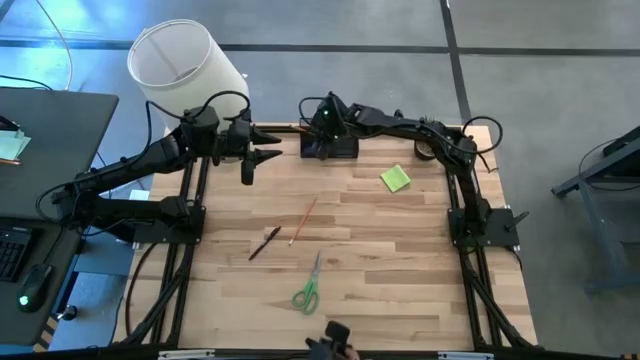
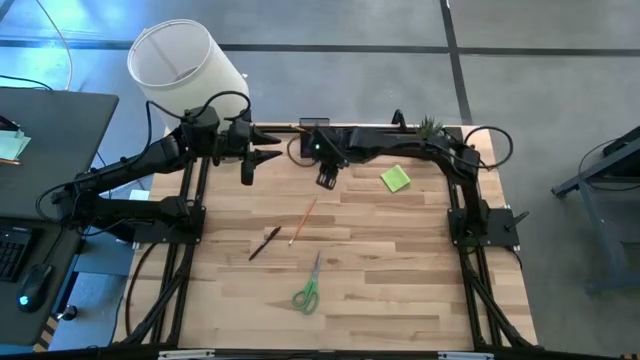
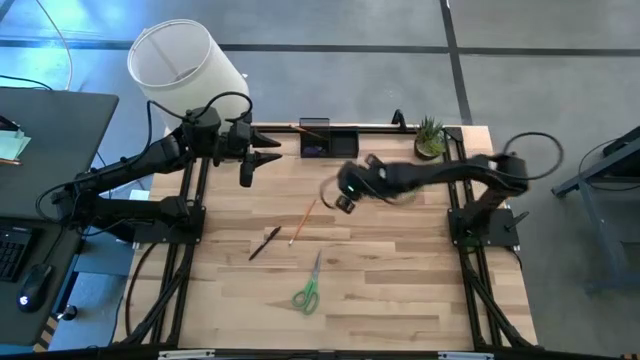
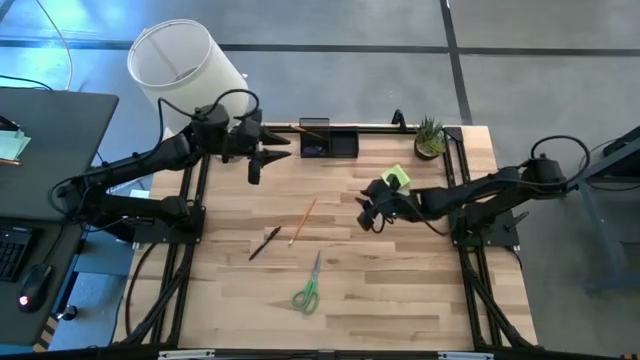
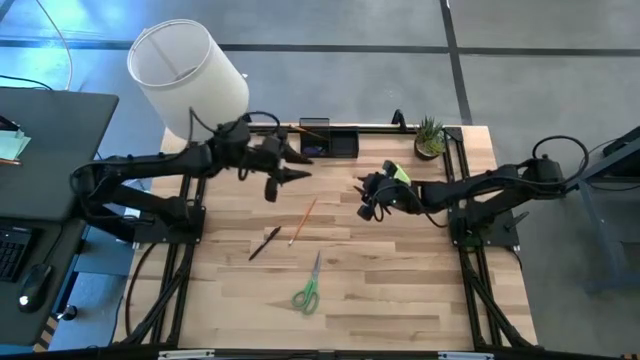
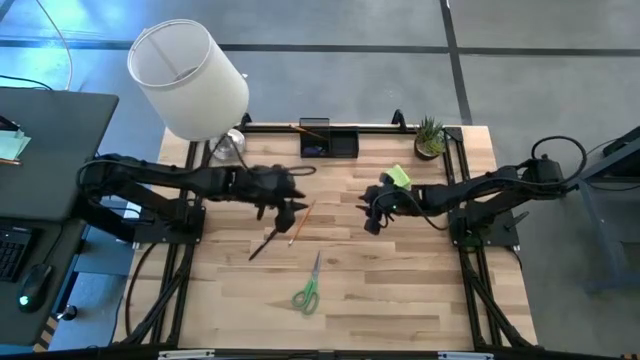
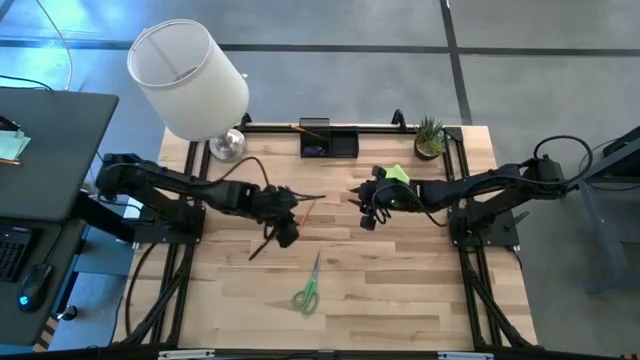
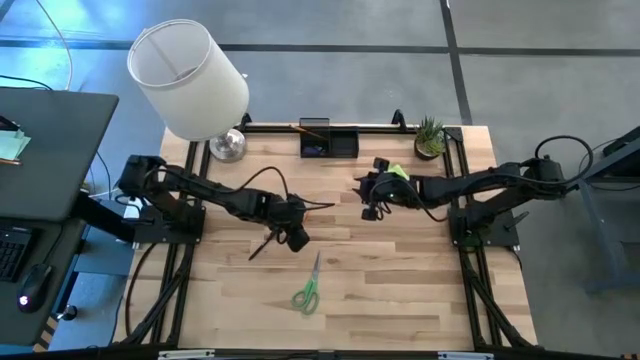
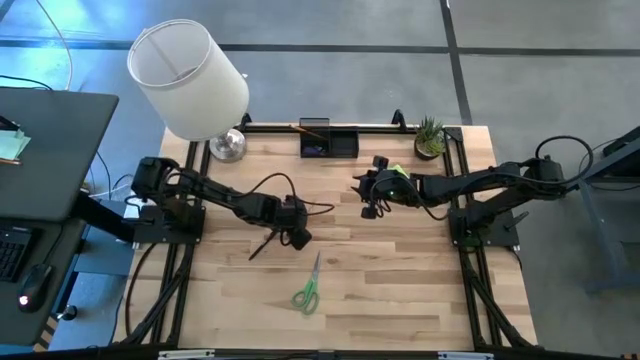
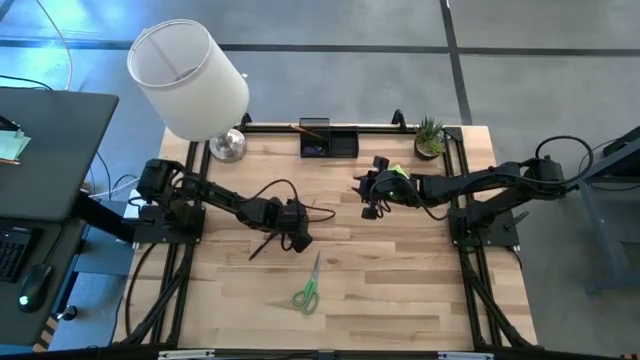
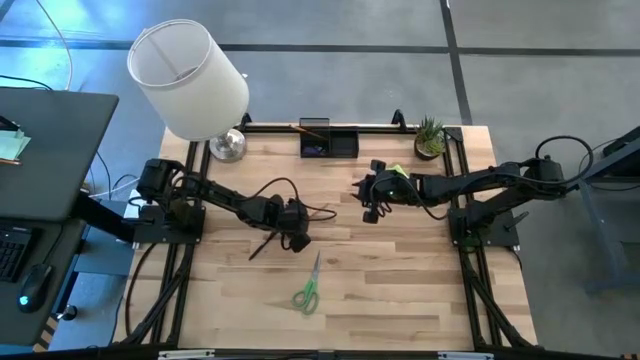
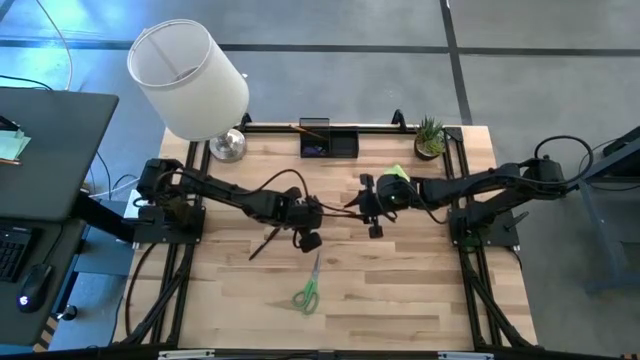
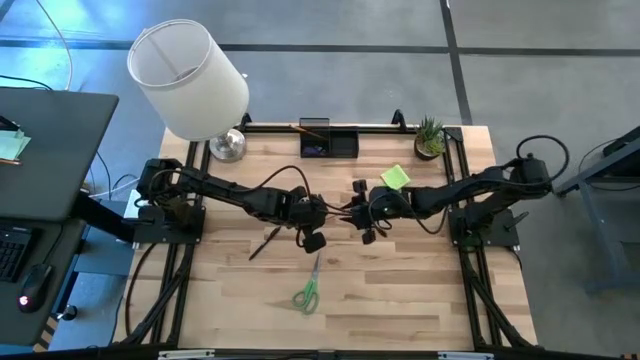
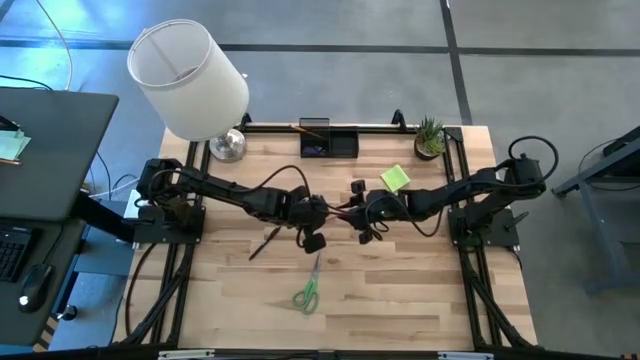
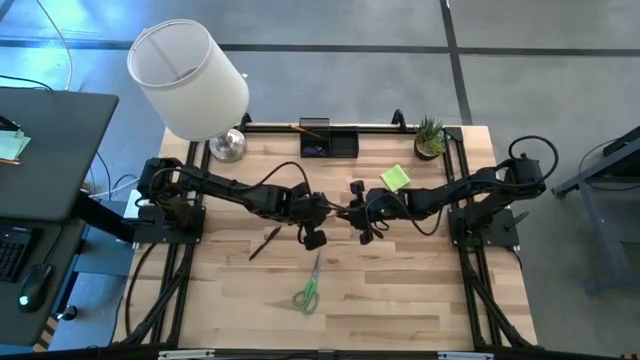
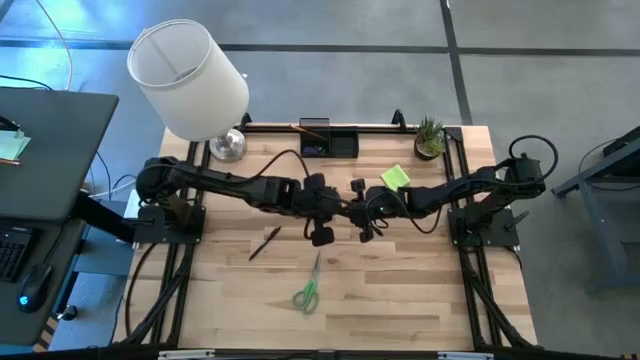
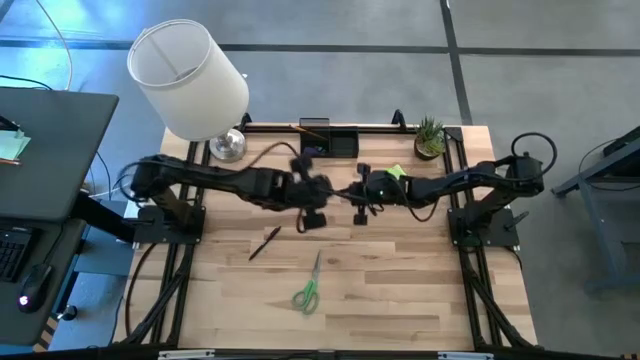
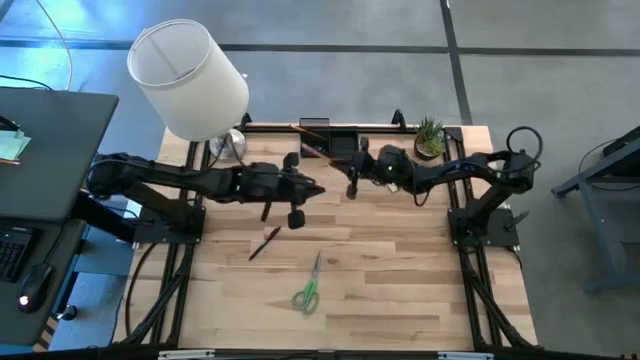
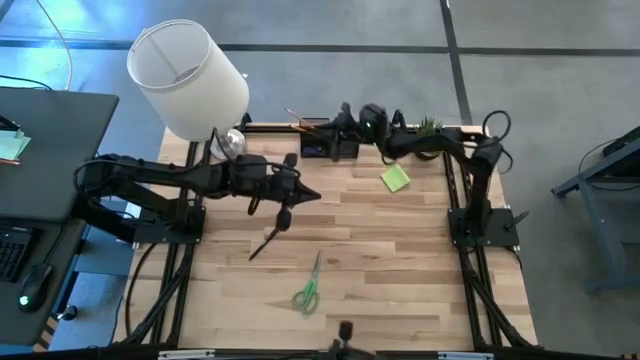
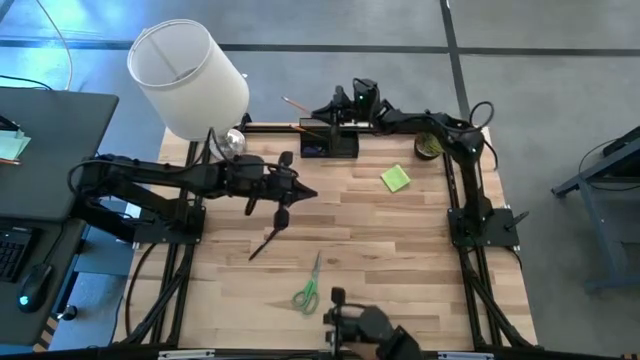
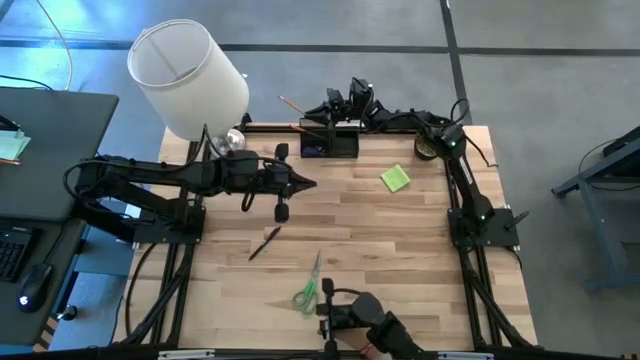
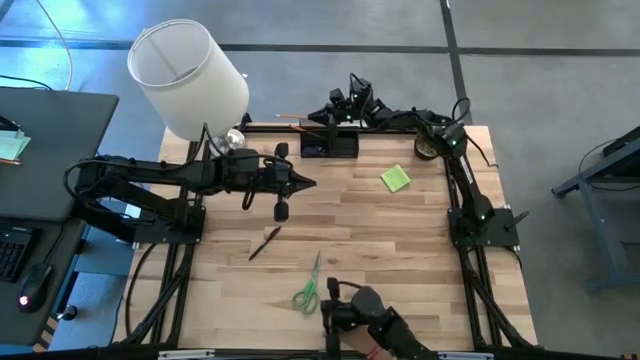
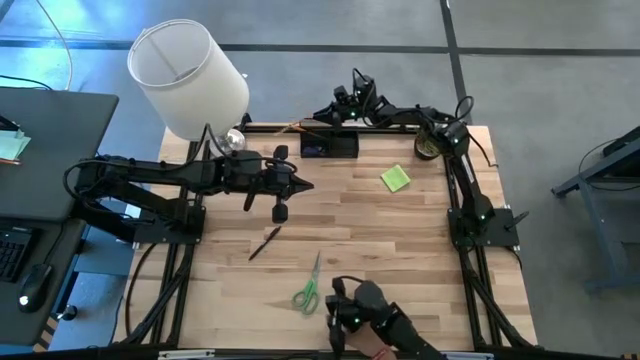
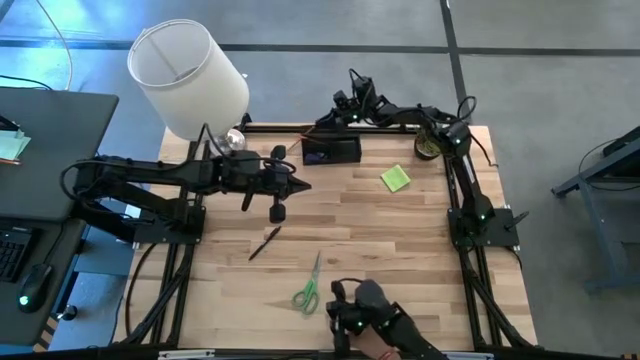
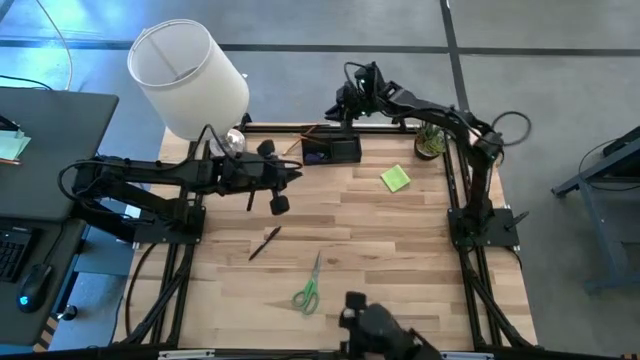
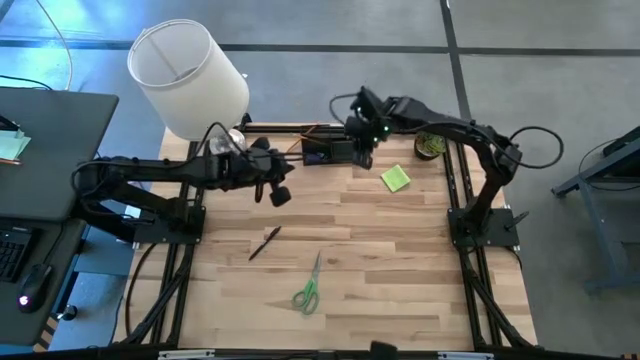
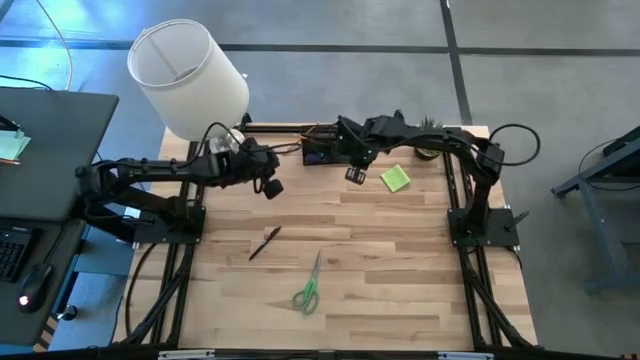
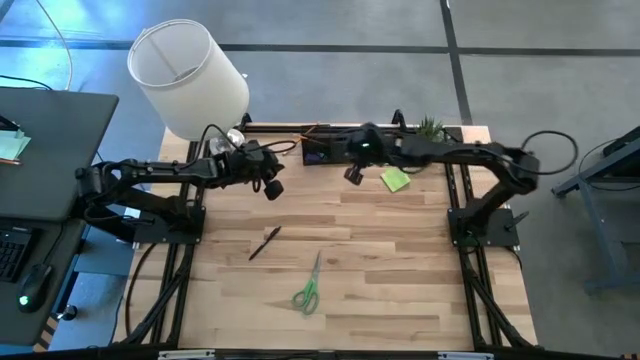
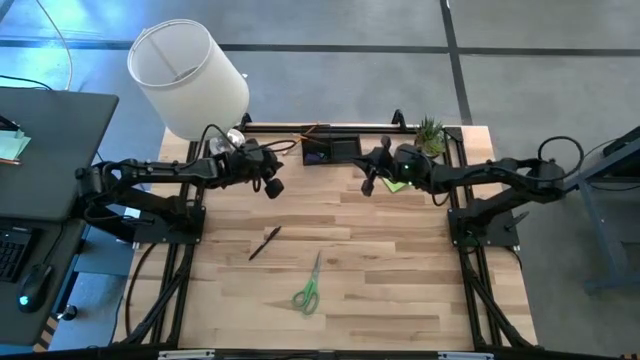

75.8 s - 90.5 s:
Task: Pick and place office supplies into organizer
Put the orange pencil into the black desk organizer

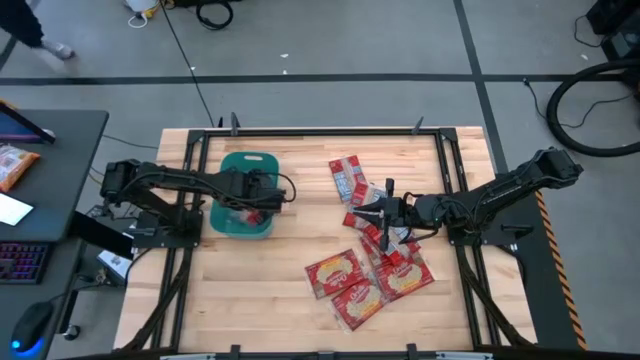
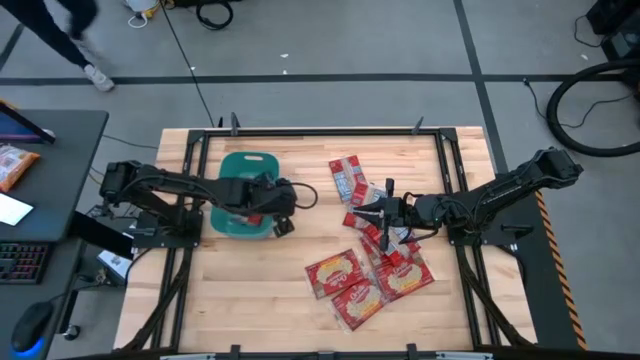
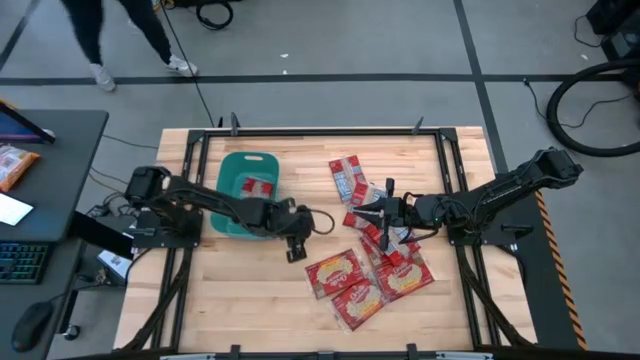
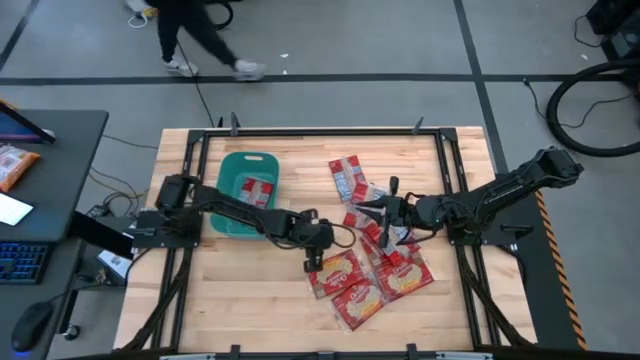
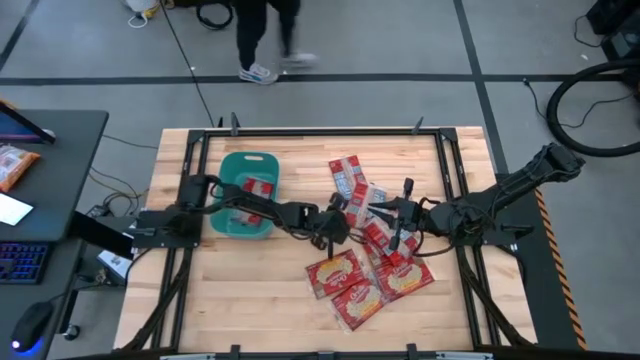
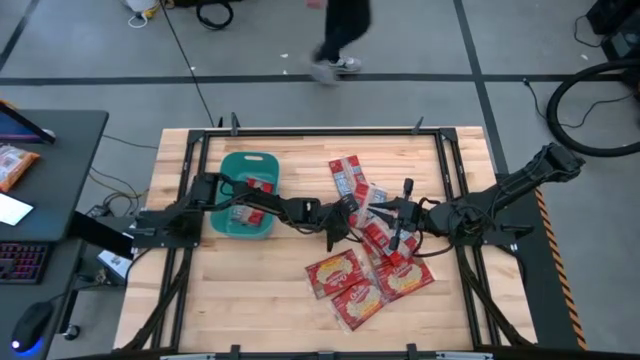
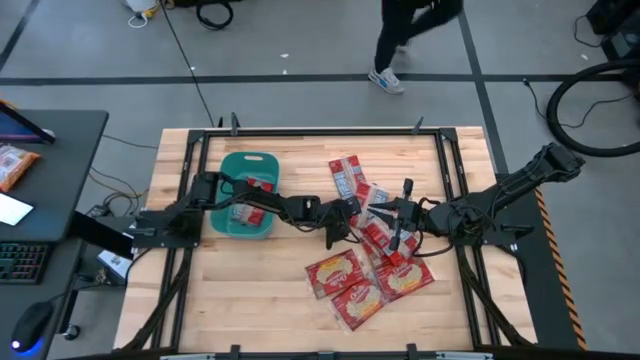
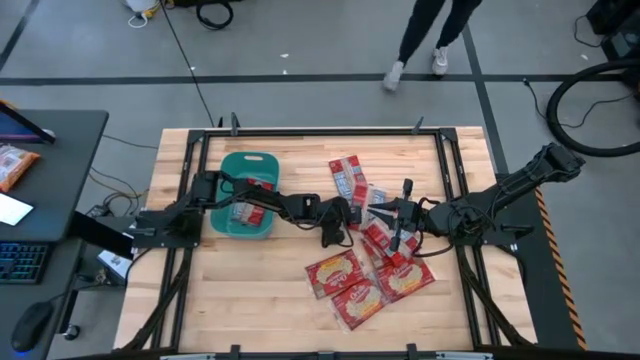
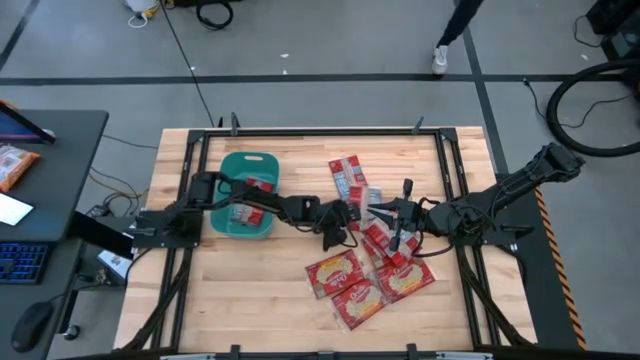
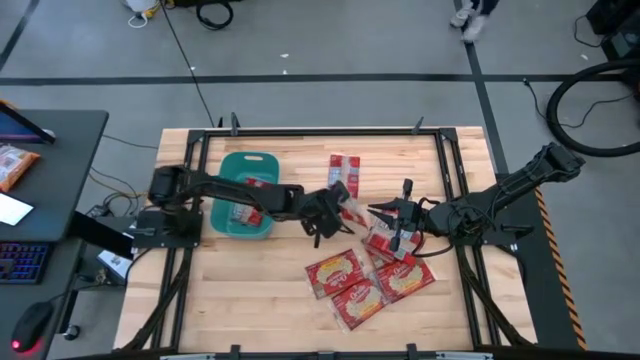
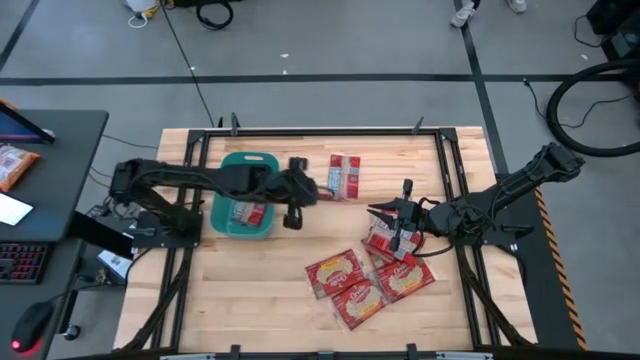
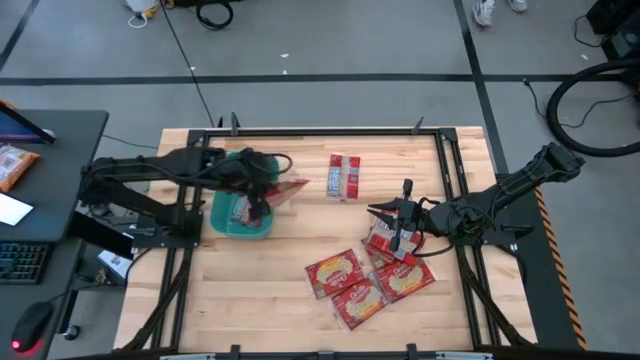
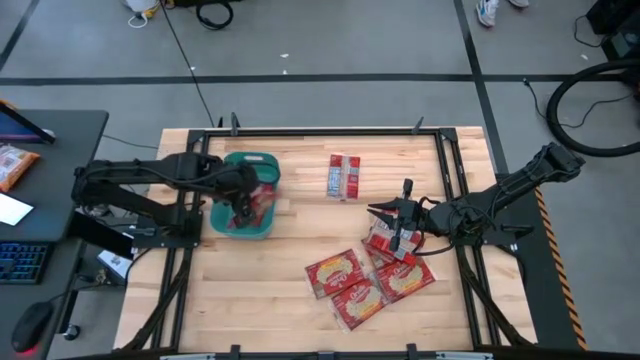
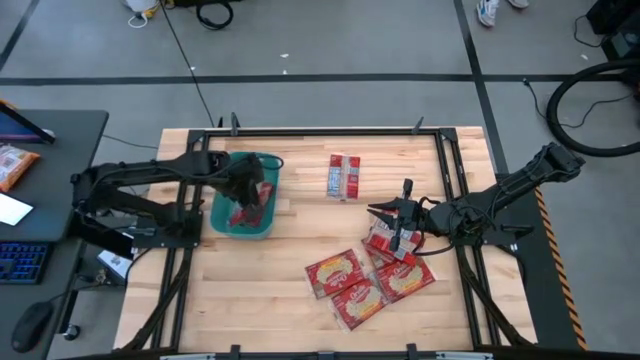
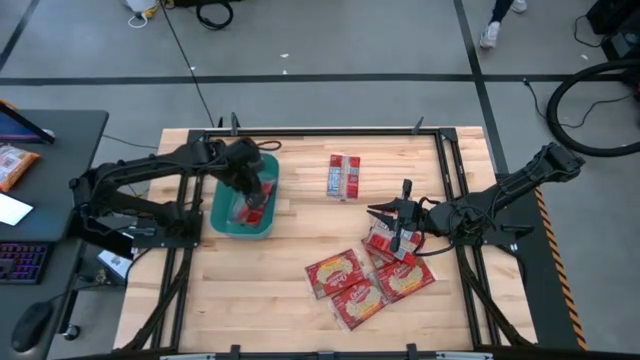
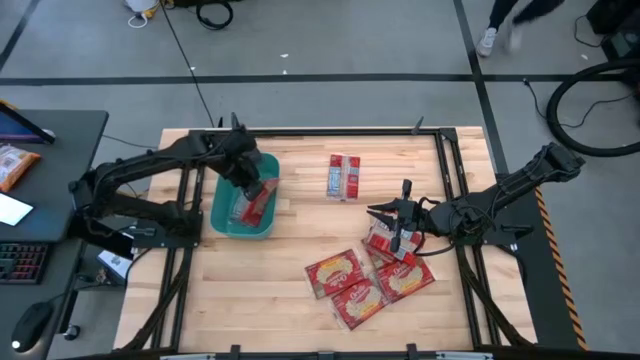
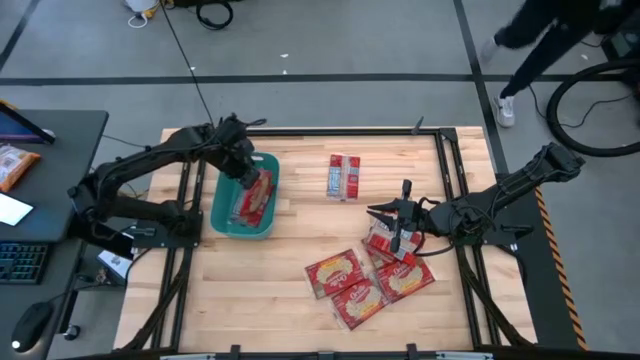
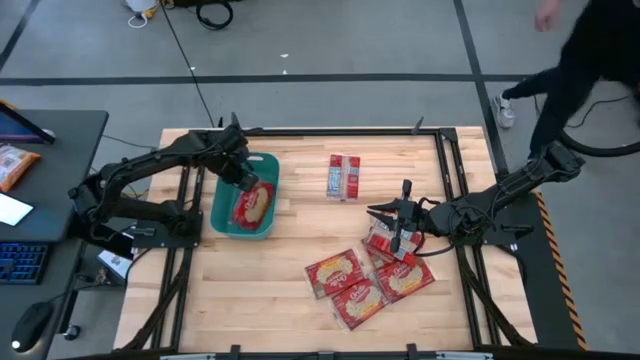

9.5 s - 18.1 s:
Task: Sort popcorn bags into baskets
Put the red popcorn bag into the green bin
